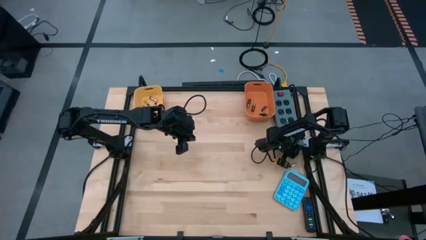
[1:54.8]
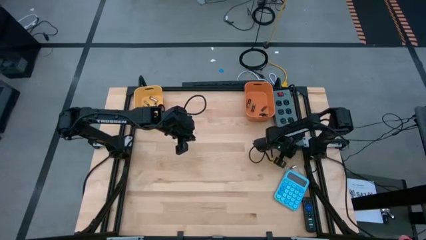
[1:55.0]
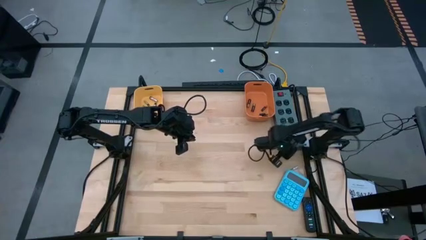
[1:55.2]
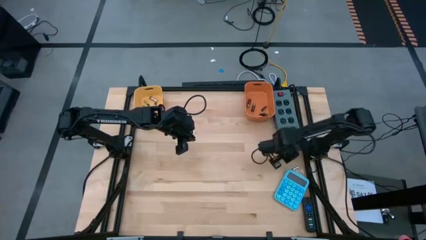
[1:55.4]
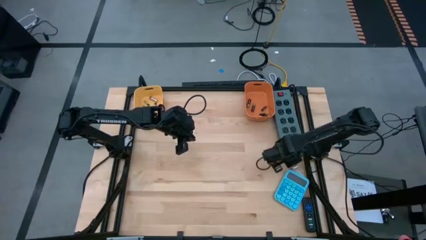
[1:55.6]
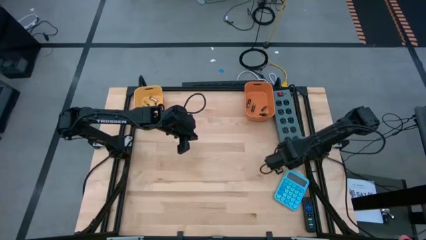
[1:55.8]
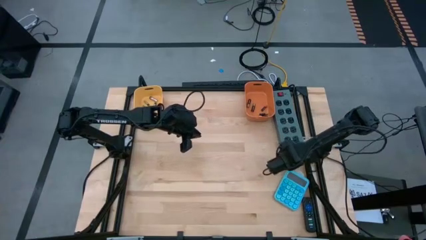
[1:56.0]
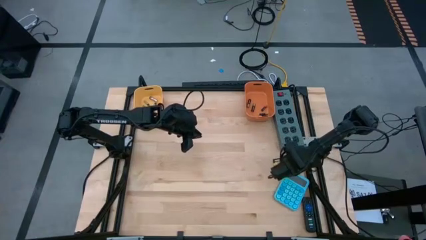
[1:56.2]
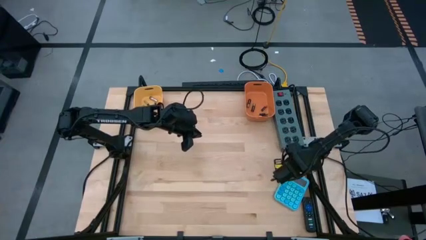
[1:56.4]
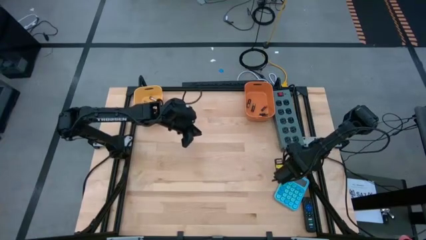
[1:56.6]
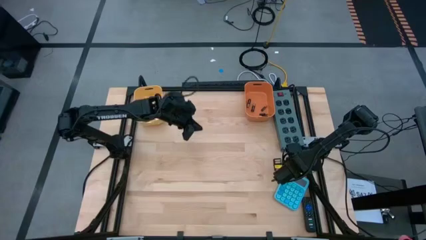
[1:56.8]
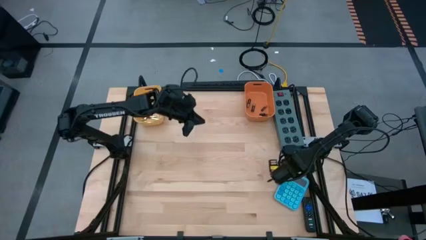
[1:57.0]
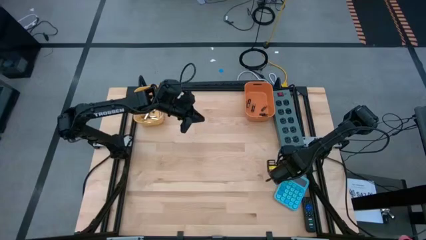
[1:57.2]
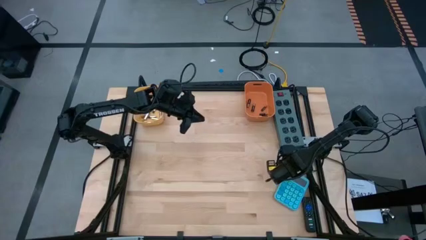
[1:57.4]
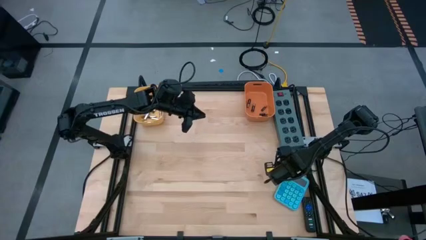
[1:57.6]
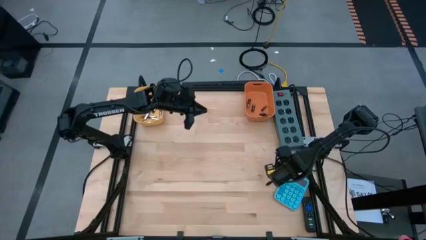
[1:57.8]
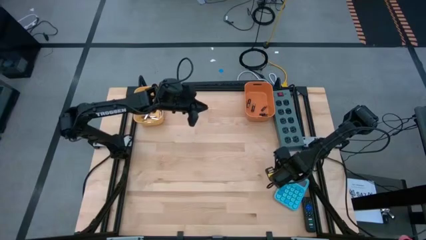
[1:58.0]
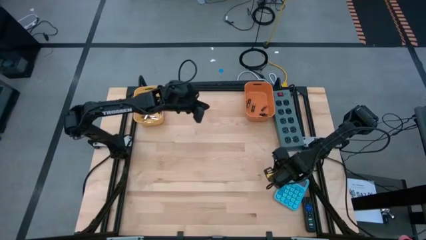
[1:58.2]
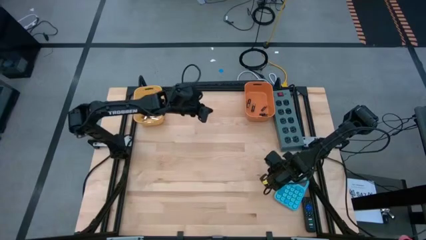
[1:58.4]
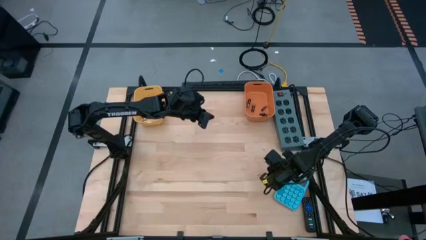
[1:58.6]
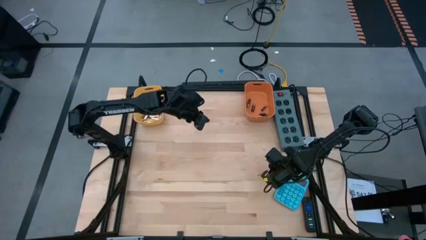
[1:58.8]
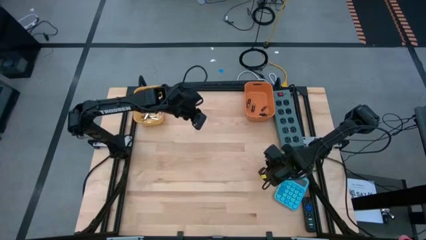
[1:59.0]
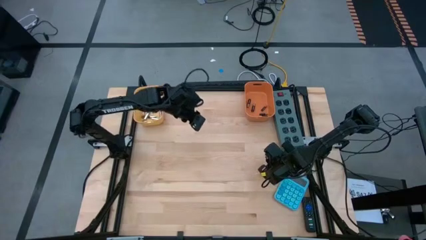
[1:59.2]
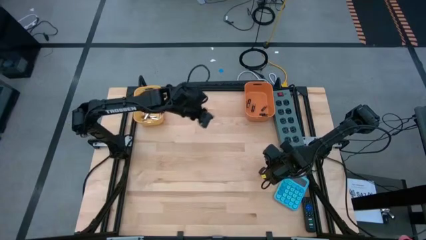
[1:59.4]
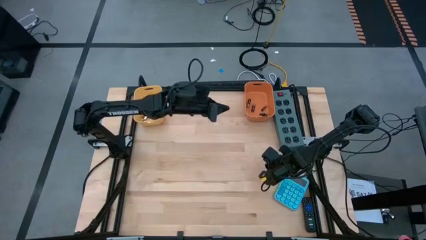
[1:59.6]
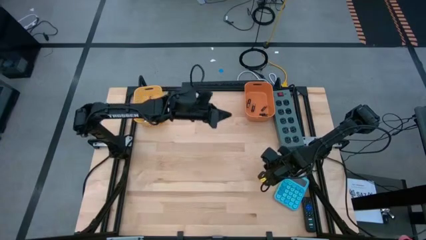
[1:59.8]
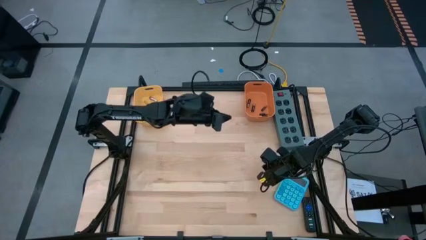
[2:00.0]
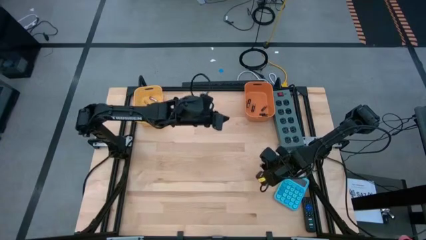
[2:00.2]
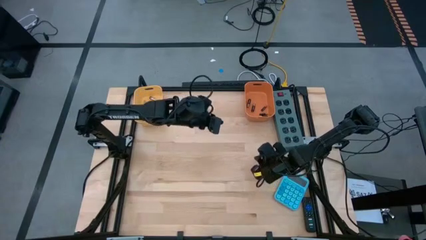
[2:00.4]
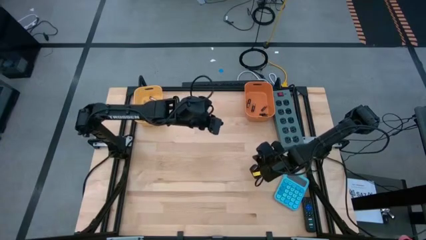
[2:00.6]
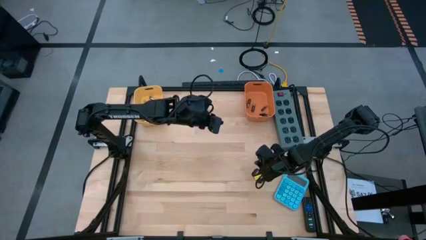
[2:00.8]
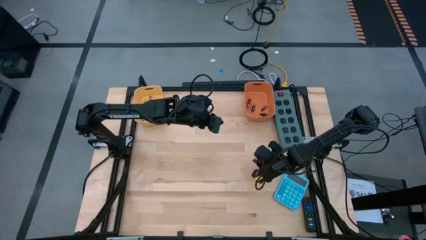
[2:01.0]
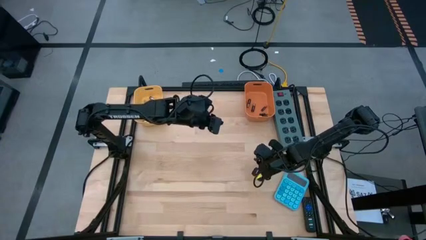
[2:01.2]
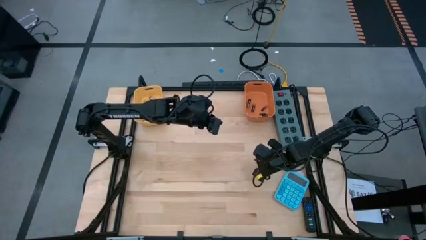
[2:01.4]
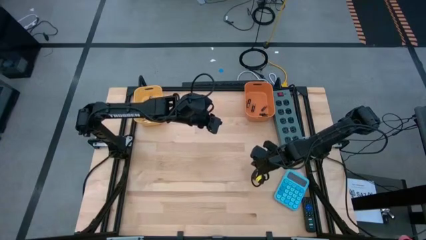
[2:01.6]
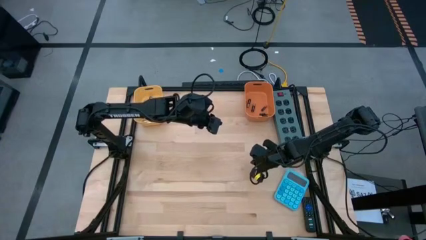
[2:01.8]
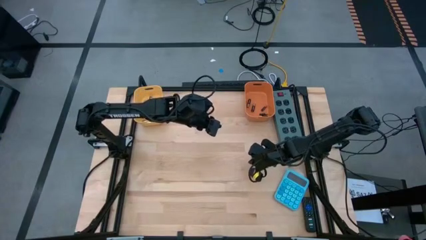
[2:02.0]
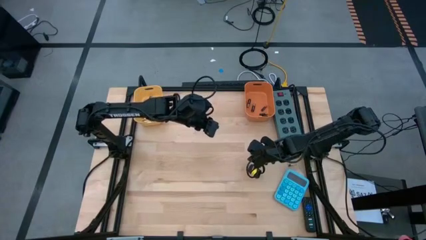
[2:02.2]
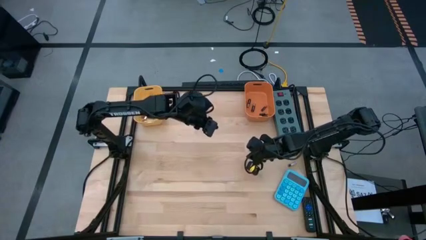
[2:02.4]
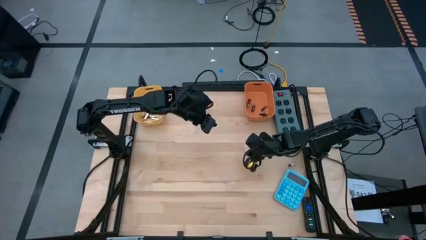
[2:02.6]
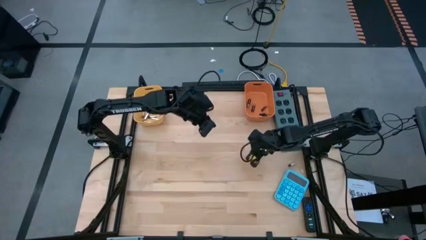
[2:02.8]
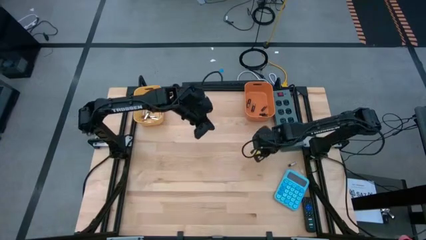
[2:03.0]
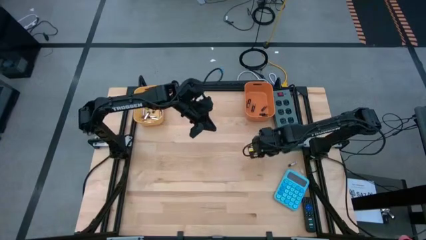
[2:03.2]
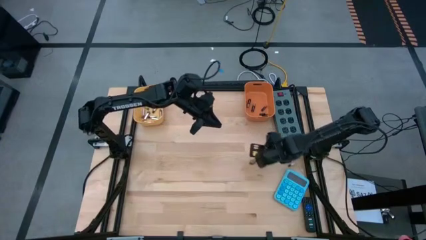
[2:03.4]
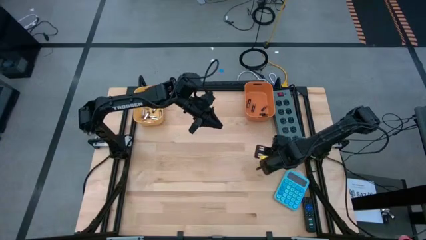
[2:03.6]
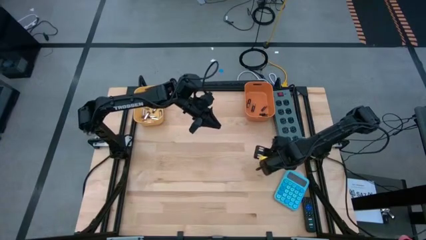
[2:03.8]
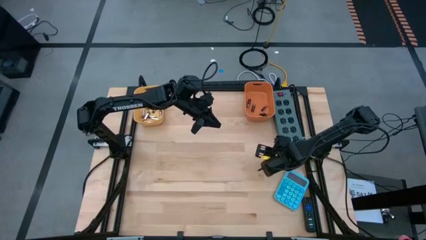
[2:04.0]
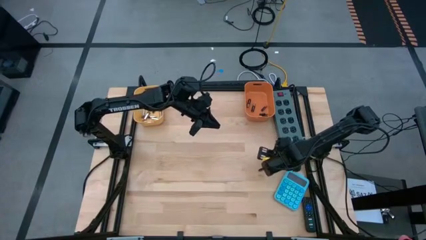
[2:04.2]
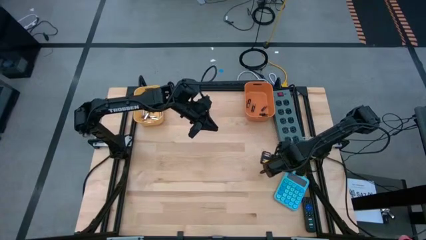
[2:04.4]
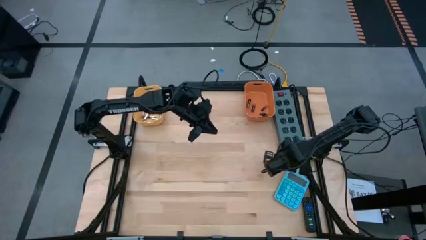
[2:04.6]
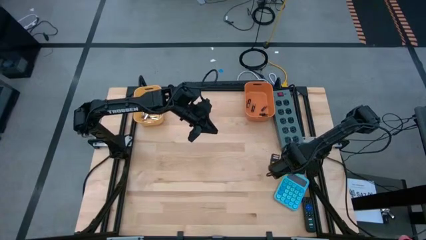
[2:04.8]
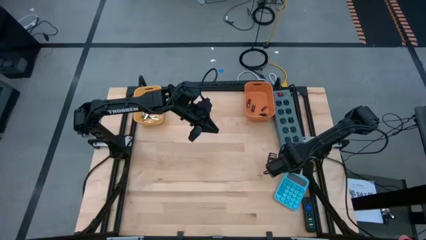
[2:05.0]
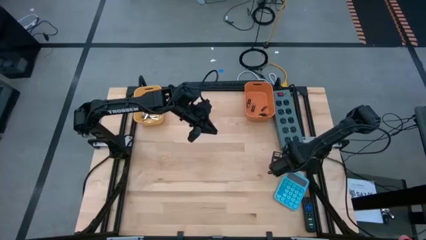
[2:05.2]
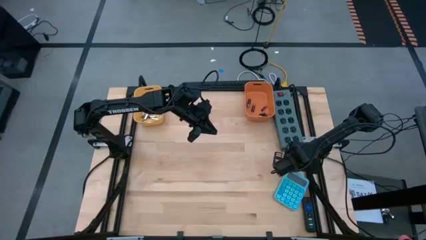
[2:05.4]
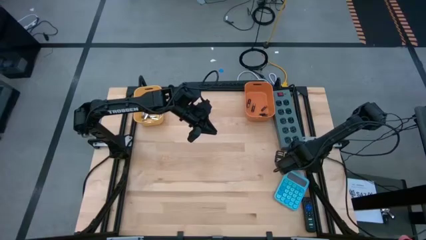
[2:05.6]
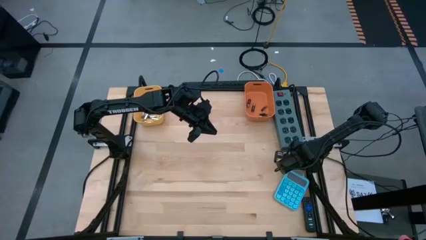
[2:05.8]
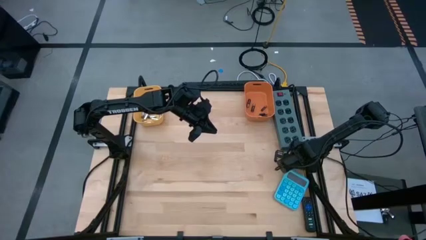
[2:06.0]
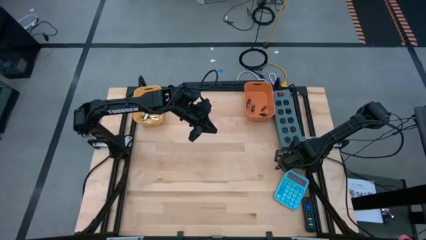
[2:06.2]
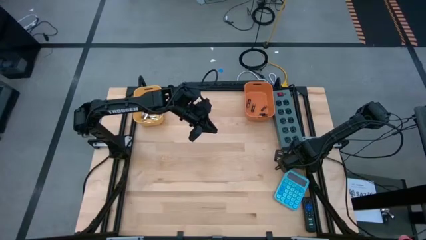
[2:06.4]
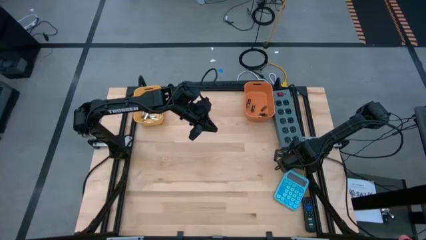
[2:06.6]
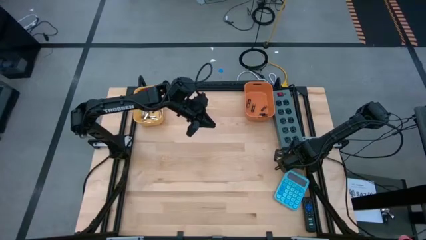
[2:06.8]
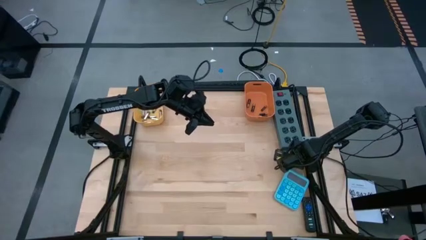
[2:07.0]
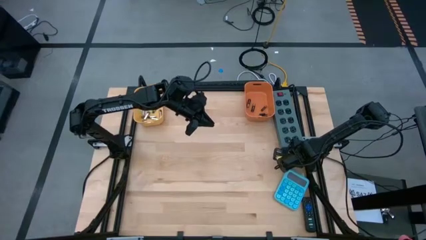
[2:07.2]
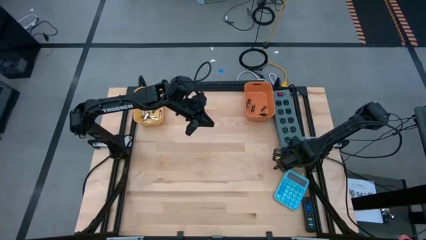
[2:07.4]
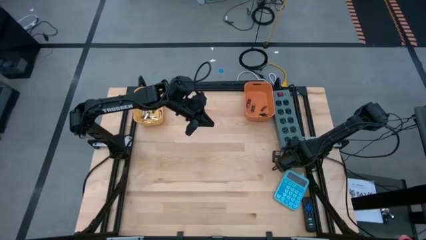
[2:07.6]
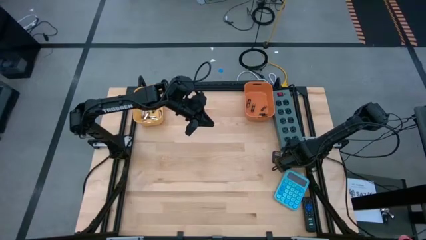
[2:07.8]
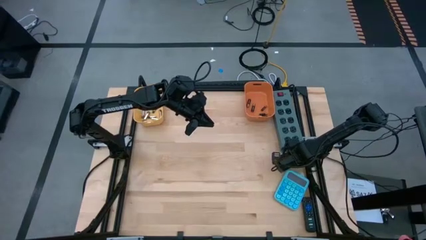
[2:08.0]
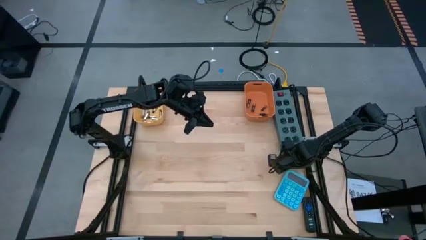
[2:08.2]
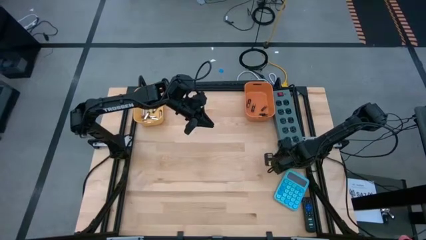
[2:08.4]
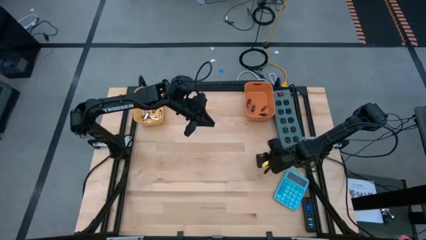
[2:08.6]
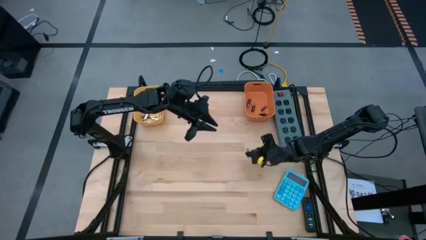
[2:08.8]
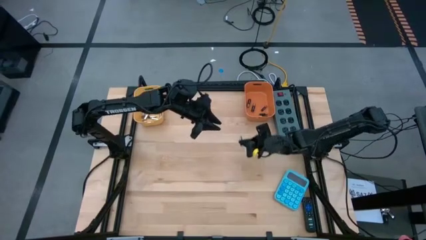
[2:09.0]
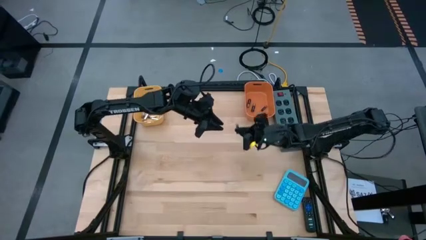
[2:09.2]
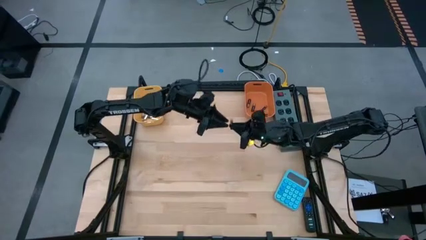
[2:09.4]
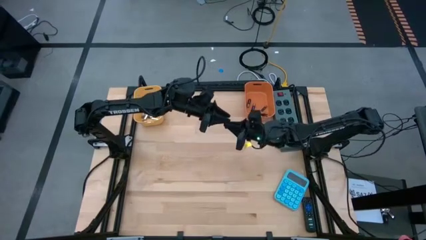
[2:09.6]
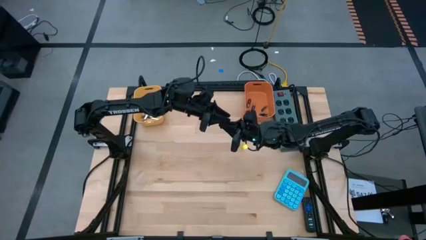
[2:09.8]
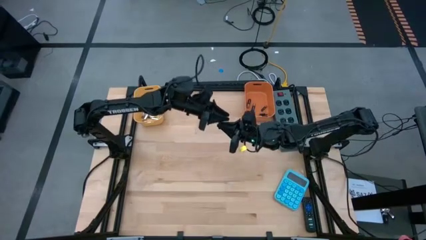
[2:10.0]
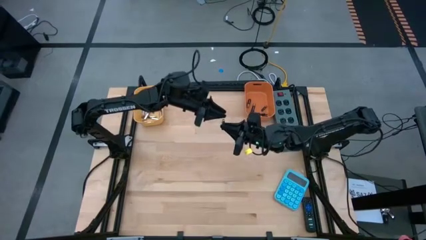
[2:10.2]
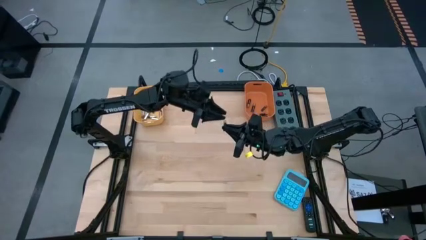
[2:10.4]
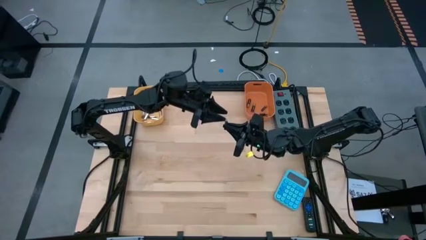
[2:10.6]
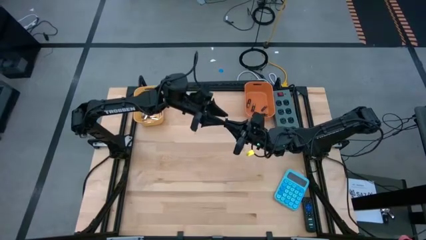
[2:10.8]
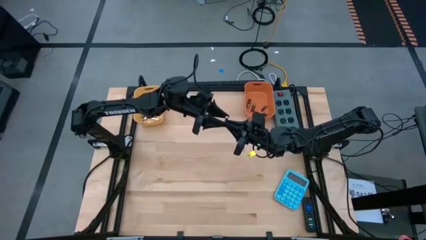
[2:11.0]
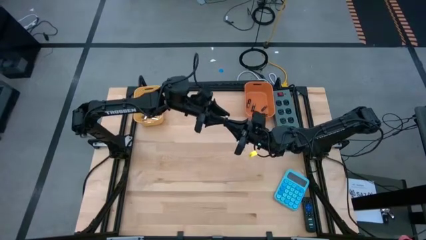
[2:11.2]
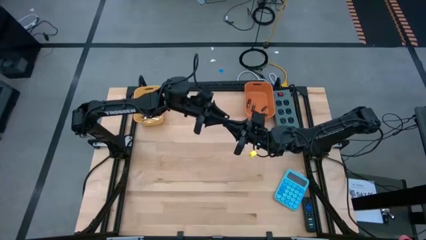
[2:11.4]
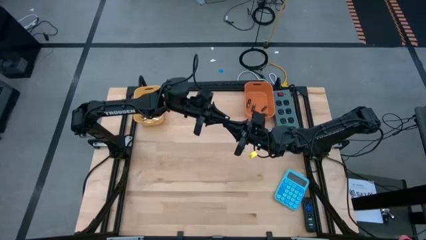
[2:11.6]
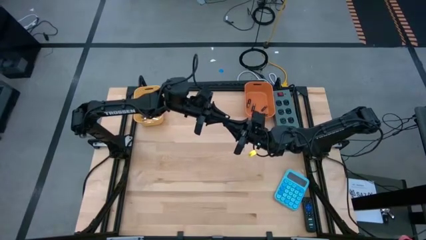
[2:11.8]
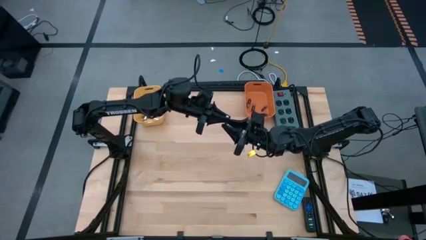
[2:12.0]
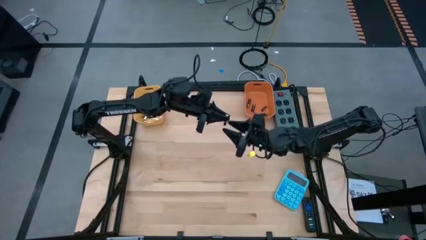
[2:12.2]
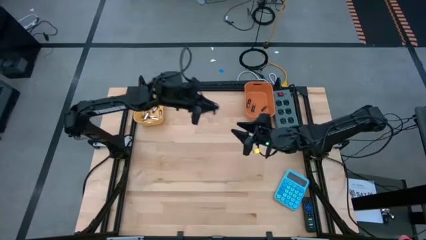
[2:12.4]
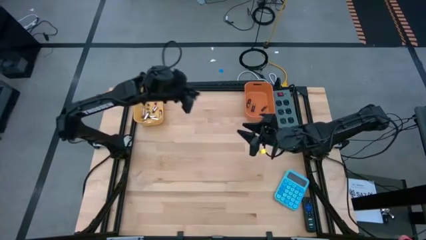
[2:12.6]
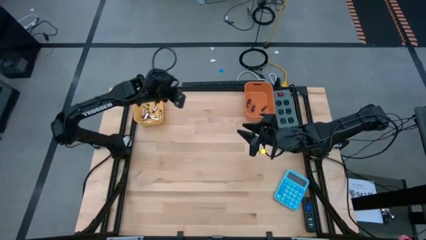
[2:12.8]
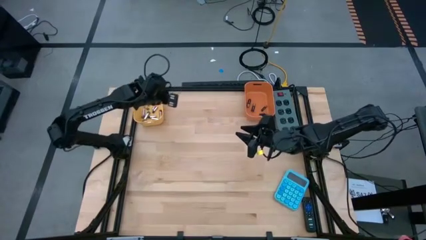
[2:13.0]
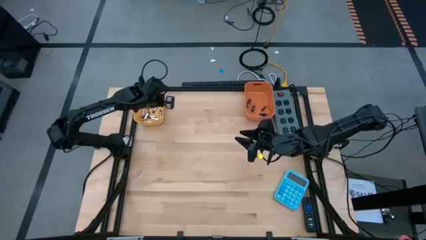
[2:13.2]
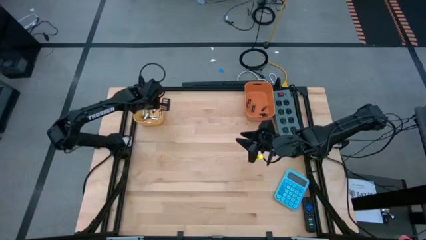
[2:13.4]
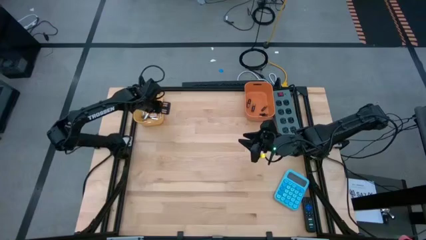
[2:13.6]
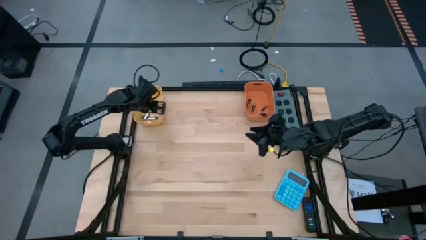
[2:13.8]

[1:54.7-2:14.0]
Task: Sort batteries
Put the silver battery into the yellow bin
